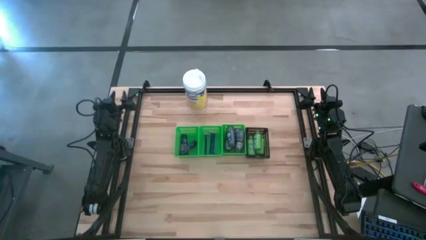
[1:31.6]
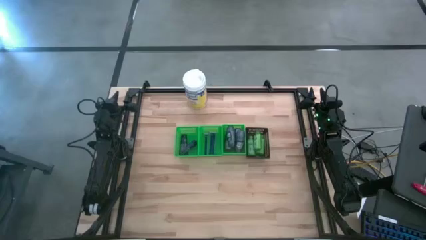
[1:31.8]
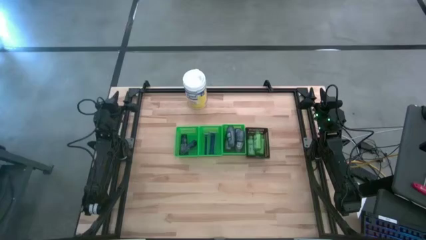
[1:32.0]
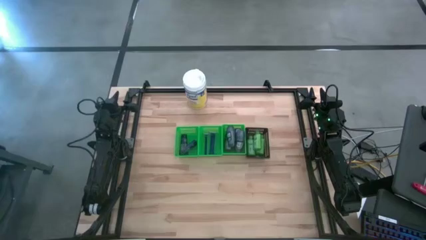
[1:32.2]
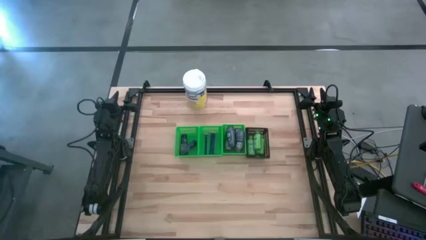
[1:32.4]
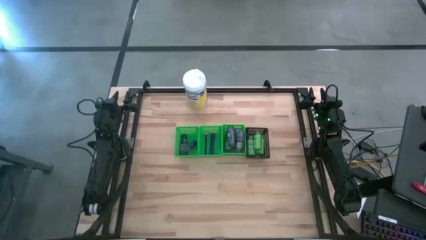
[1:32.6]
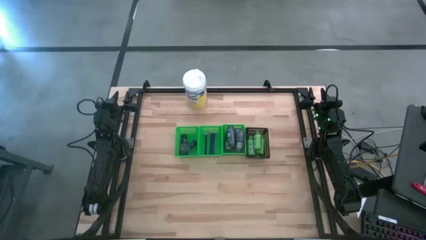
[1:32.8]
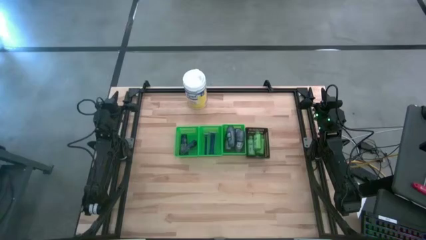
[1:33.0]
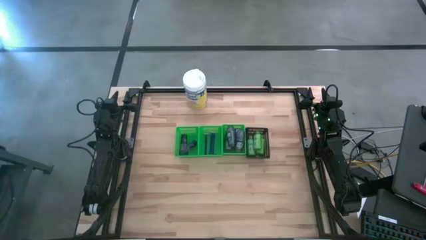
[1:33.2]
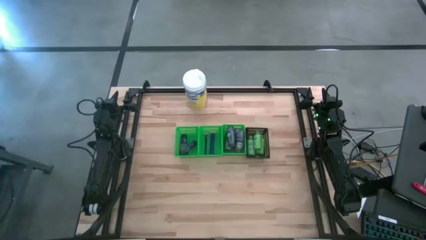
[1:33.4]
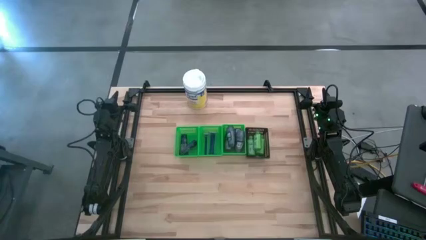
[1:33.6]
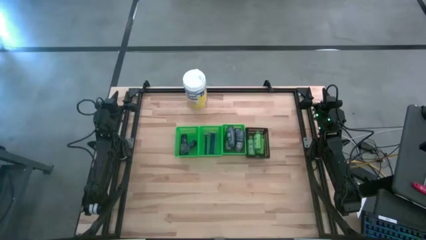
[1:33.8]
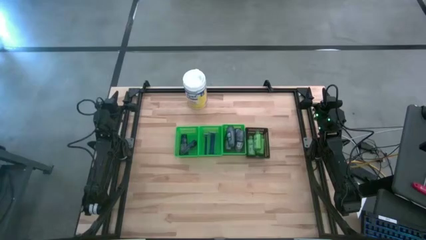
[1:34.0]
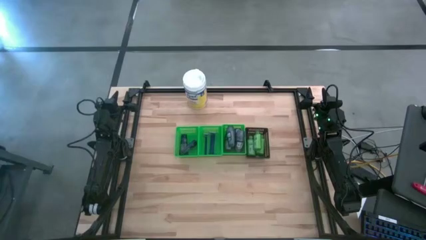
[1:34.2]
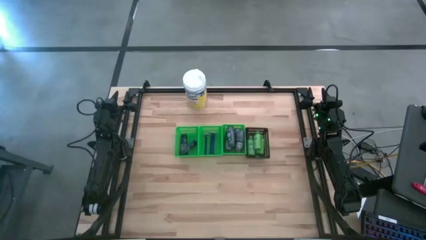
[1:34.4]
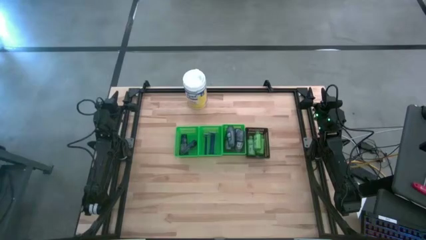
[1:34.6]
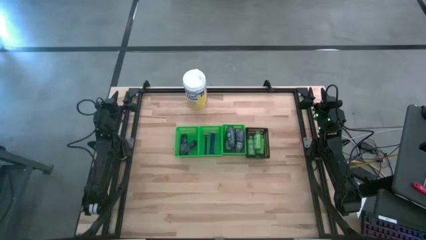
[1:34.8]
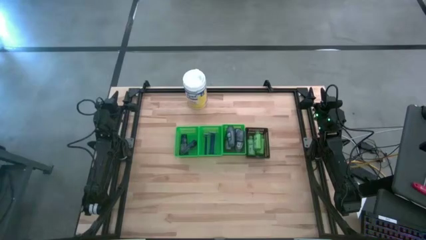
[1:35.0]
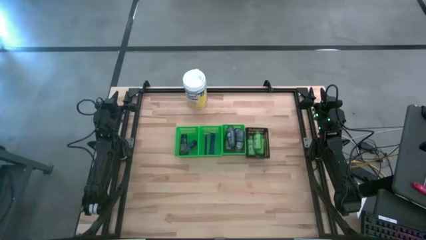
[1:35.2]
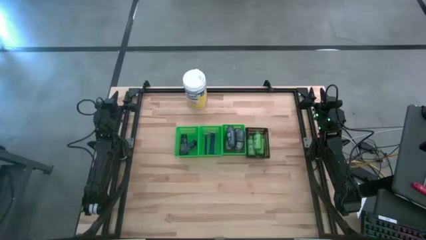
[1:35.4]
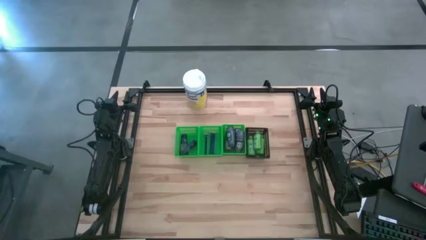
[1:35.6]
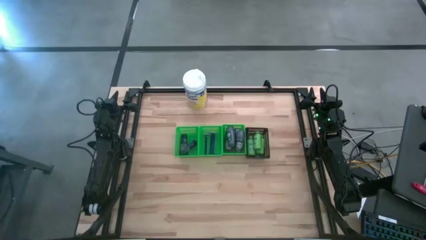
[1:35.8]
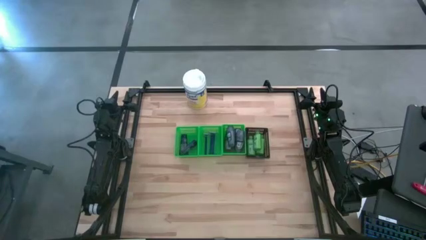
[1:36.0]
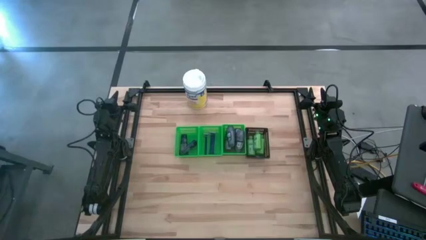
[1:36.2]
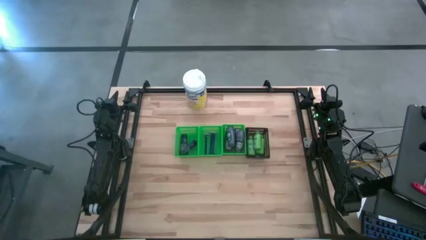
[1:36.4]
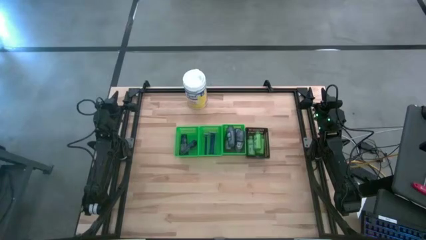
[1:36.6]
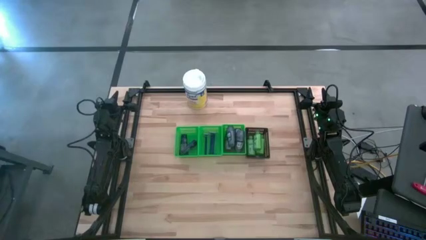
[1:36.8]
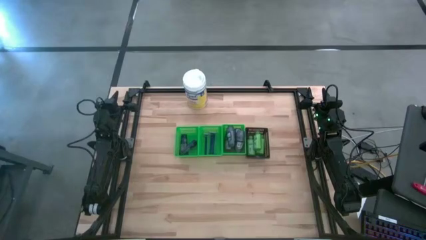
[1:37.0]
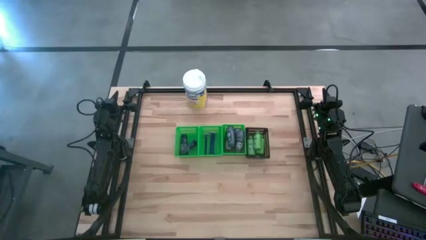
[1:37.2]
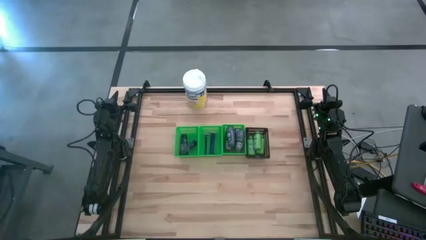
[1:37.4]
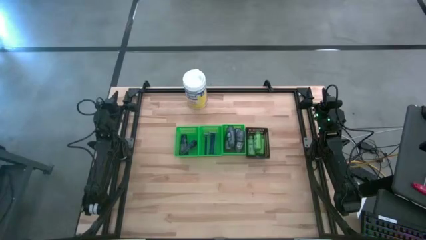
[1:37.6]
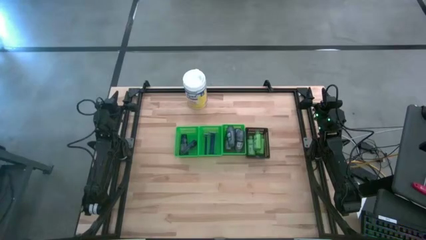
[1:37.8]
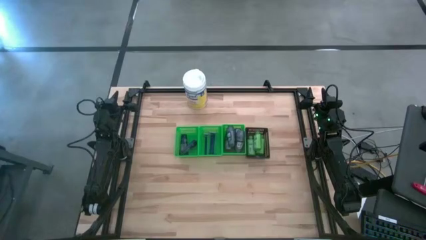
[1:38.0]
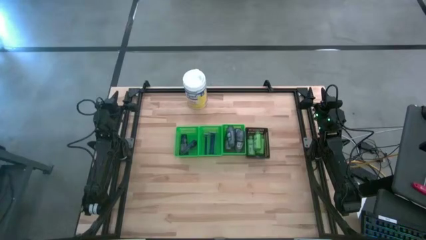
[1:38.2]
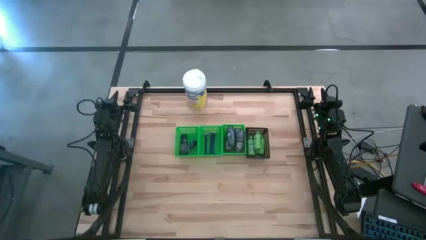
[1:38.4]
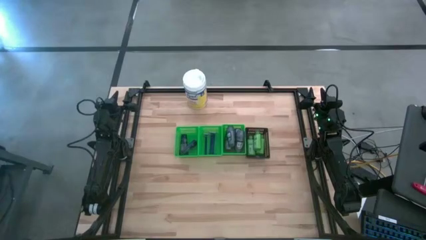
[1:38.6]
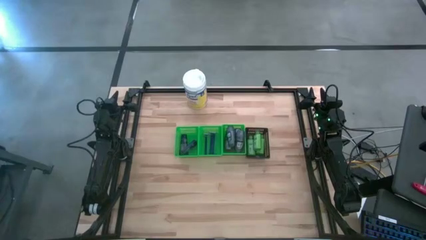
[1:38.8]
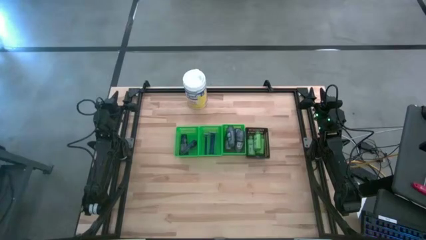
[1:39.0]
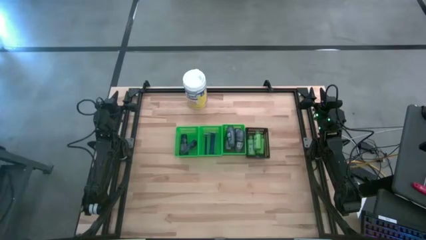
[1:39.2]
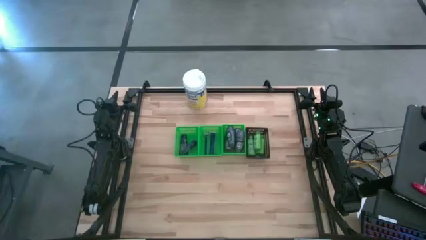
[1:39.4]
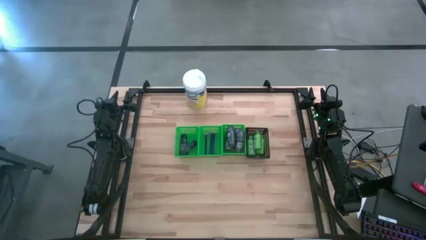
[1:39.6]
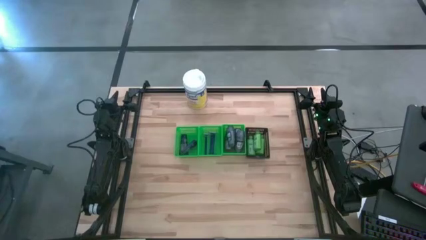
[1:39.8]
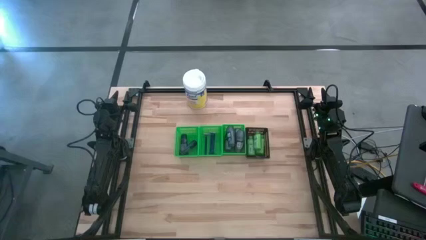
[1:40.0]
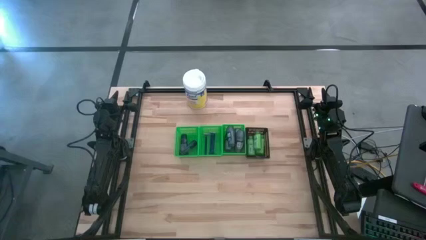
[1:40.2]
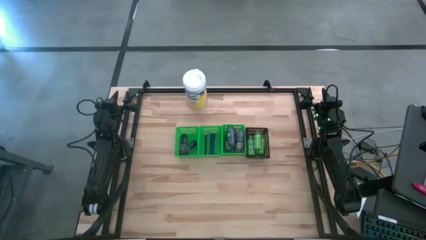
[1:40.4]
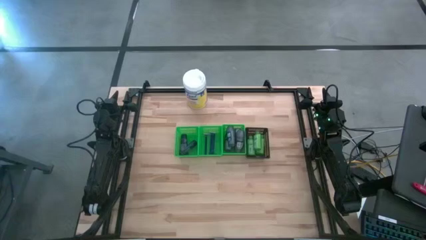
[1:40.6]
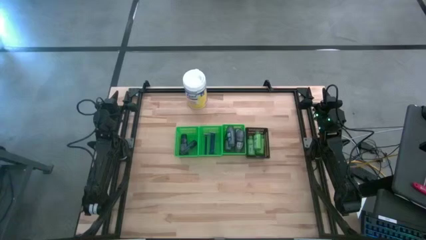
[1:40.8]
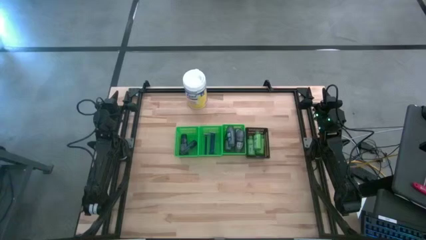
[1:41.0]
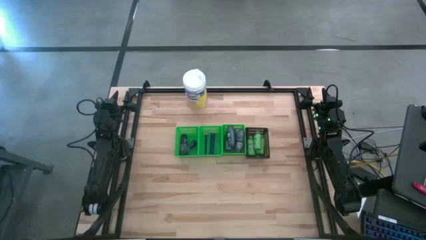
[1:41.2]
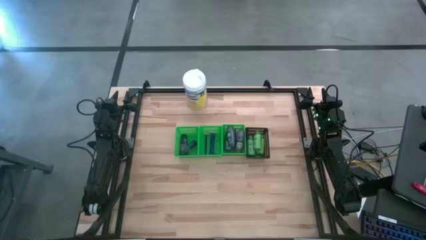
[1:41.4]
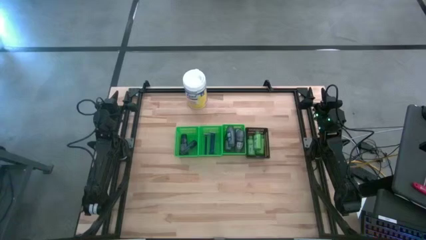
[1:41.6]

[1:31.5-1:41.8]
Task: Pick & Place Travel size toiletries
Return to Home Position

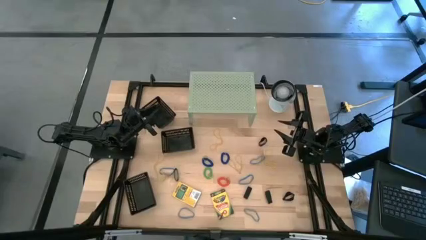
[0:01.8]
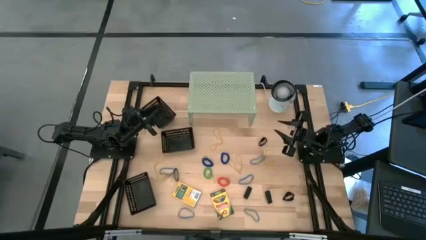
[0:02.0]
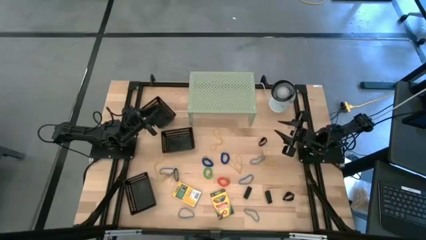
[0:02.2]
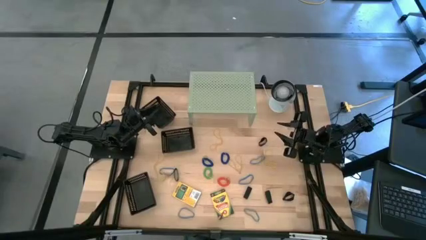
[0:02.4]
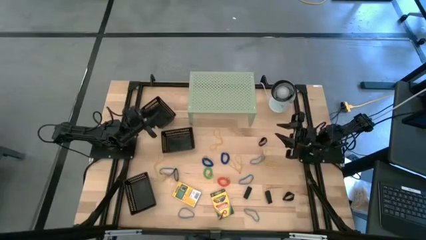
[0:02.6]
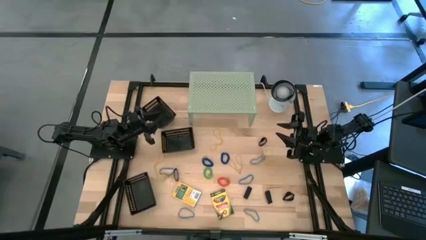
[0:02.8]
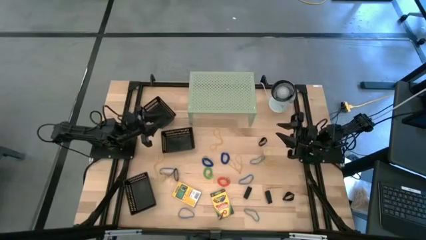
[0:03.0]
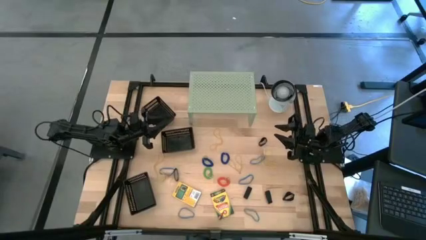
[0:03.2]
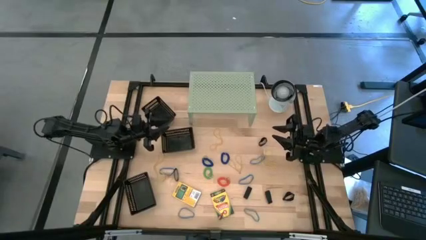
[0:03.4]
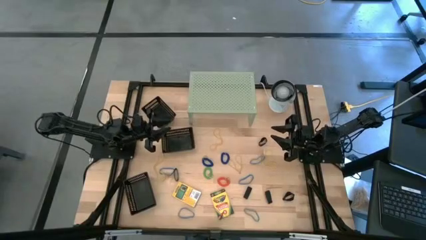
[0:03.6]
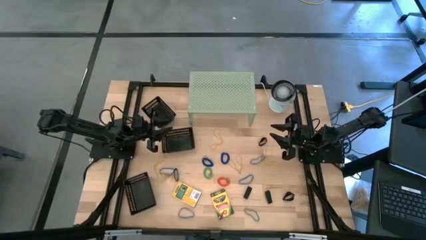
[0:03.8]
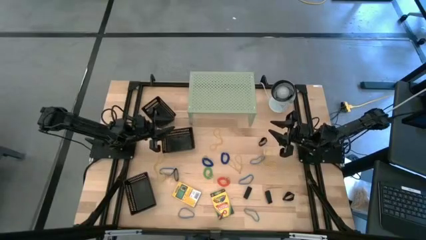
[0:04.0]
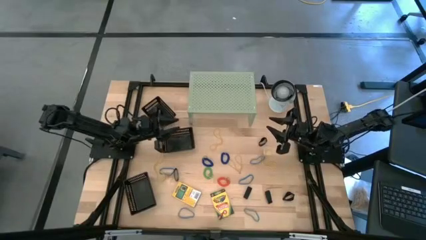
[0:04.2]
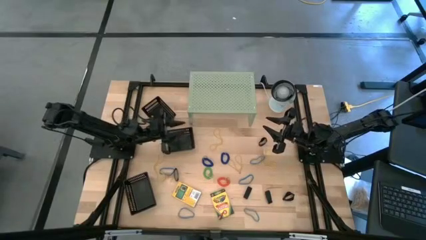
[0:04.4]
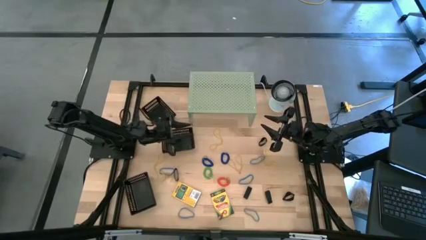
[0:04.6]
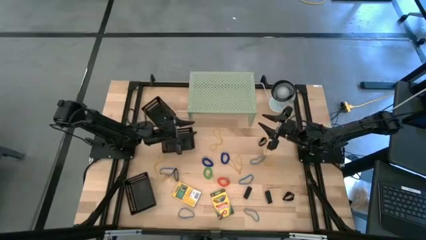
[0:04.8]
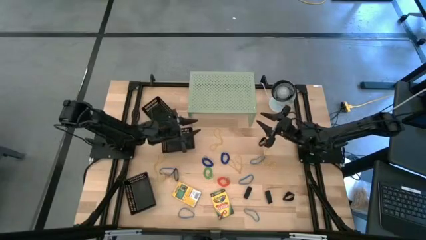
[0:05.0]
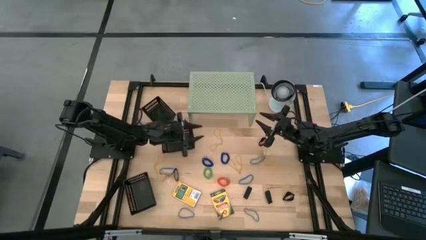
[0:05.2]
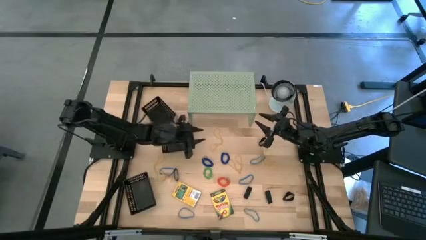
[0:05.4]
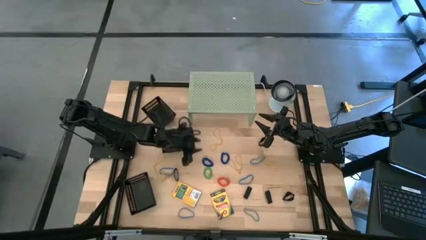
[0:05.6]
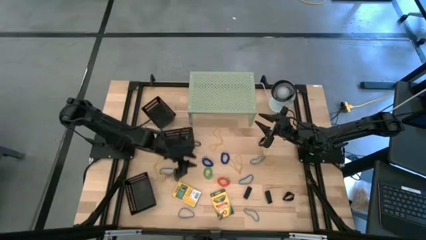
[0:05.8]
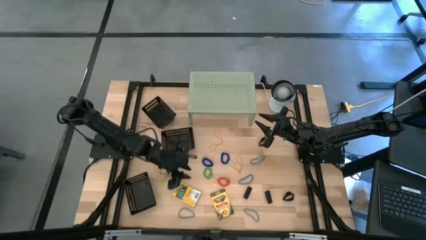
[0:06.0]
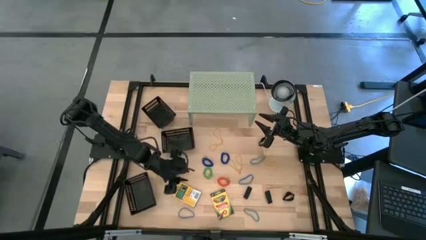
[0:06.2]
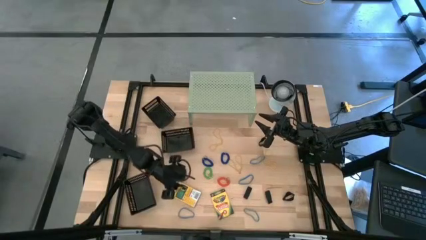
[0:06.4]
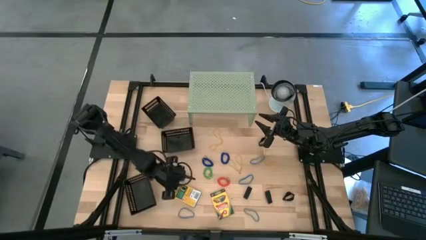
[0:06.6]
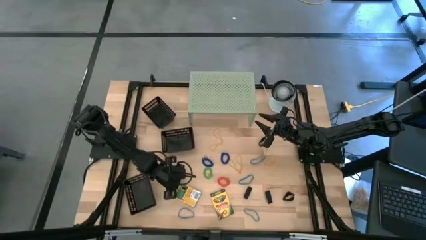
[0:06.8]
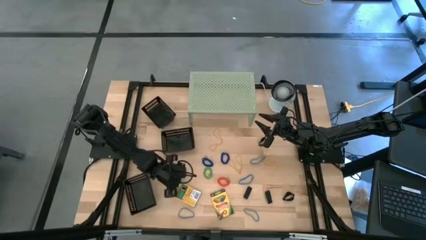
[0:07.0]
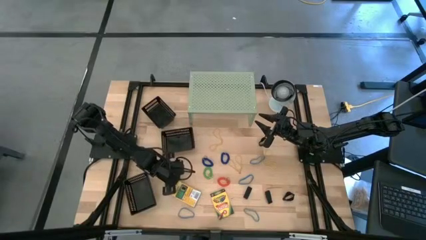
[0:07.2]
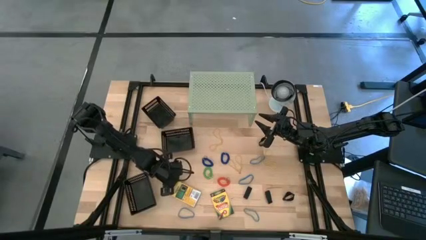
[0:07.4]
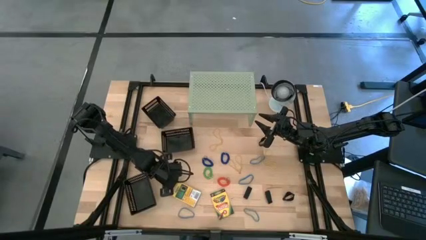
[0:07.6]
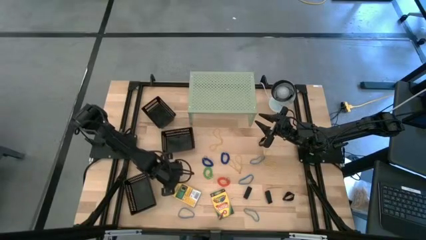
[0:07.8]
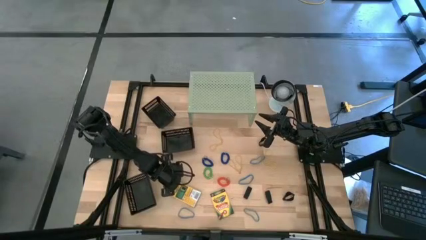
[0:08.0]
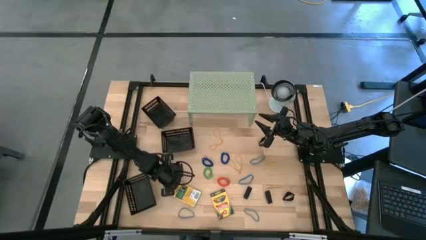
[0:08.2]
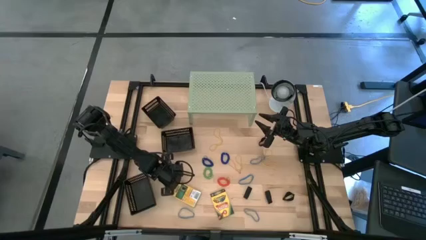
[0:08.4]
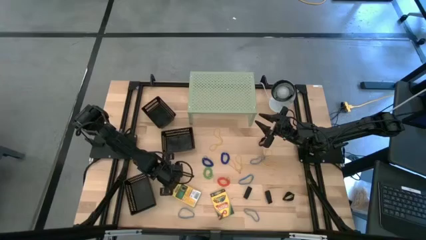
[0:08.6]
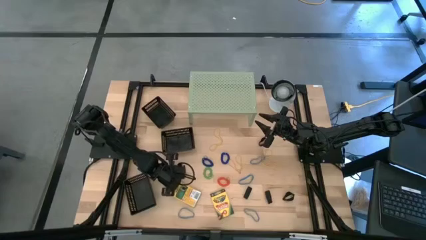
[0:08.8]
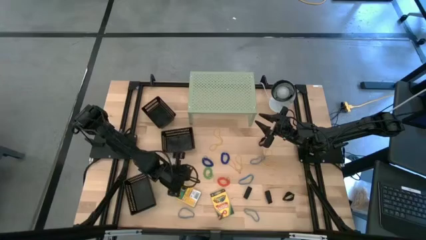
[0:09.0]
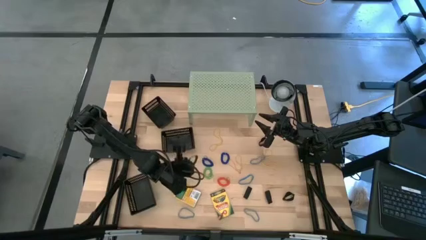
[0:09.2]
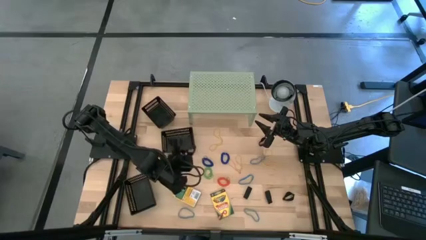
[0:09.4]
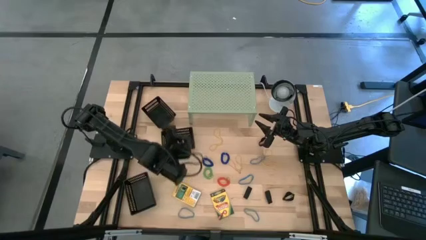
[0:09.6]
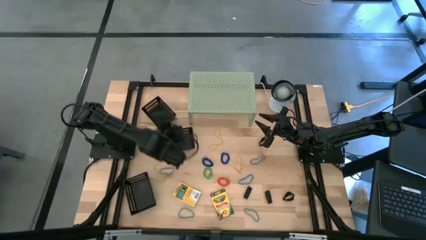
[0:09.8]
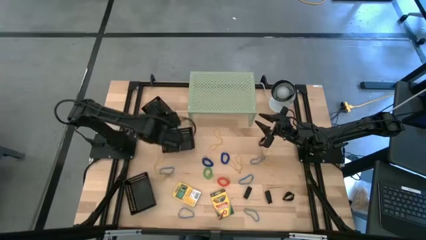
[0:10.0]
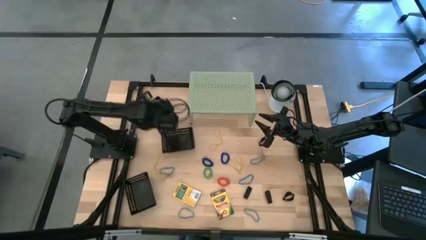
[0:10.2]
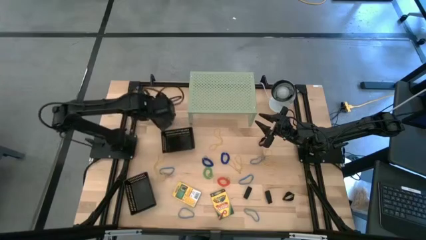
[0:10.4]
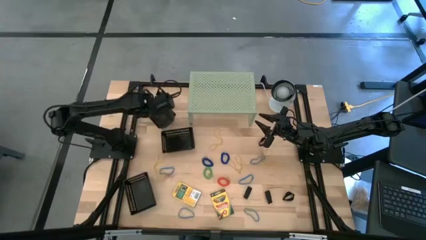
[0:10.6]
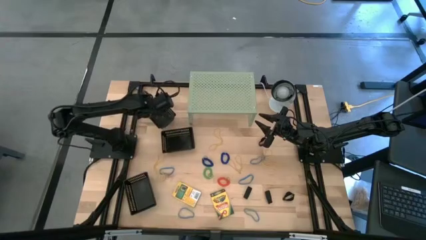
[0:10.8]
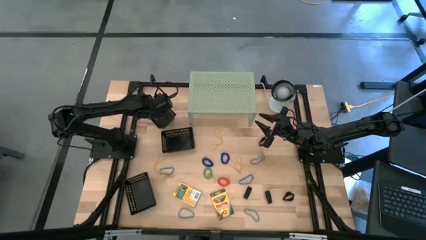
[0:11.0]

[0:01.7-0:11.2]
Task: Pick & Place Office Desk Supplies
Put the black rubber band into the top black bin
